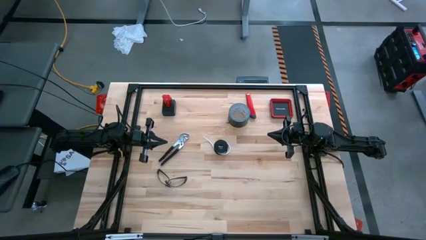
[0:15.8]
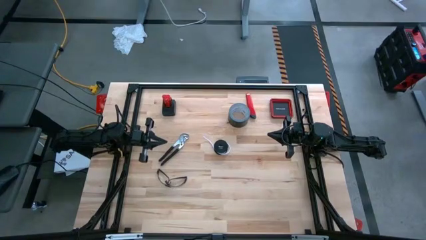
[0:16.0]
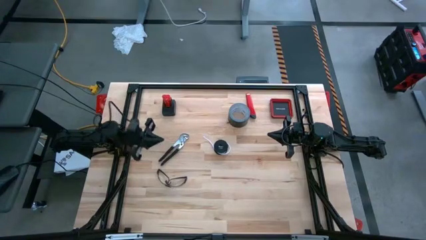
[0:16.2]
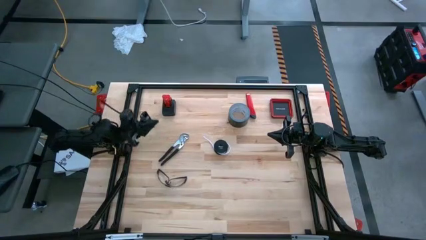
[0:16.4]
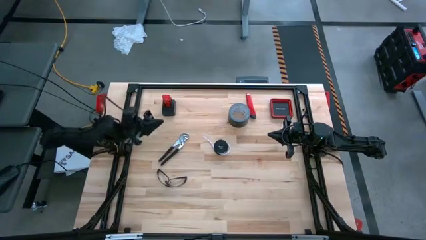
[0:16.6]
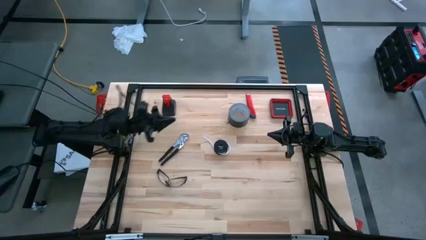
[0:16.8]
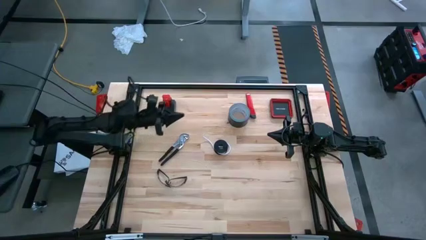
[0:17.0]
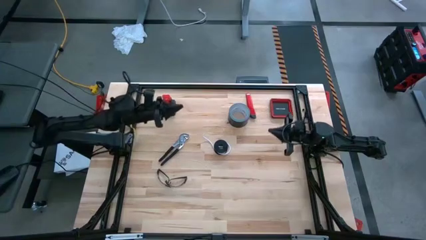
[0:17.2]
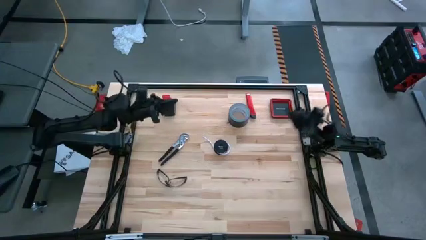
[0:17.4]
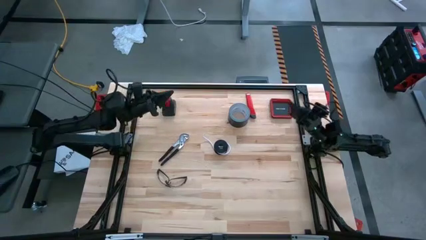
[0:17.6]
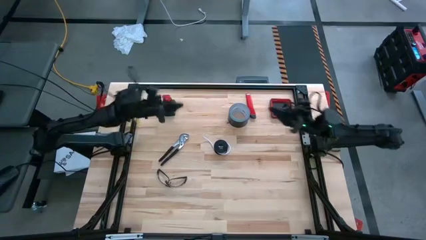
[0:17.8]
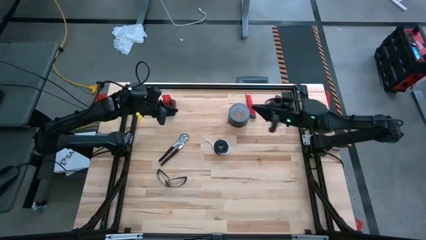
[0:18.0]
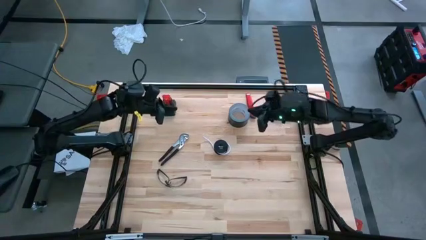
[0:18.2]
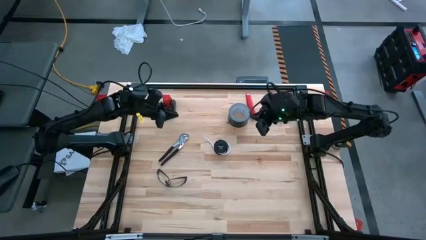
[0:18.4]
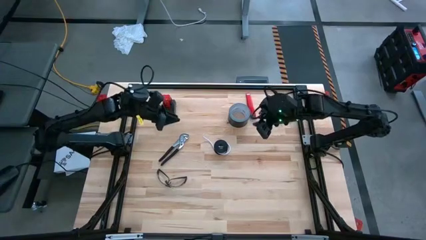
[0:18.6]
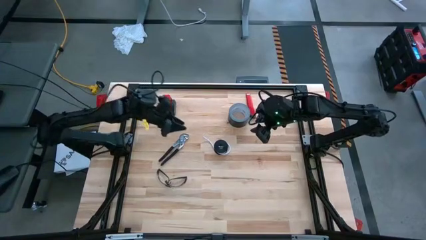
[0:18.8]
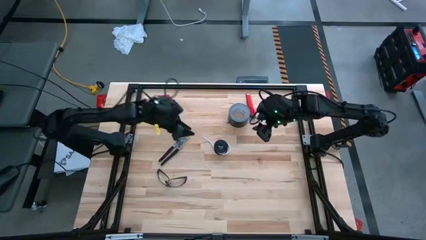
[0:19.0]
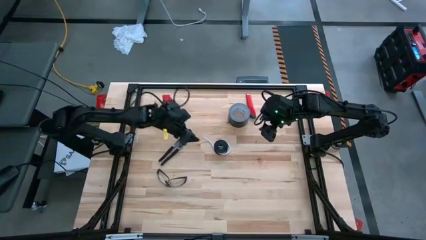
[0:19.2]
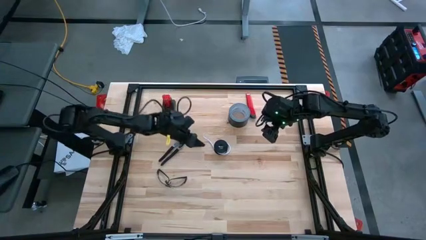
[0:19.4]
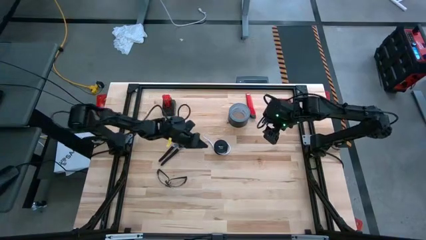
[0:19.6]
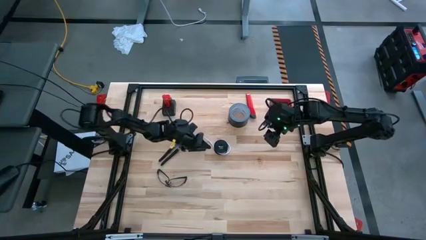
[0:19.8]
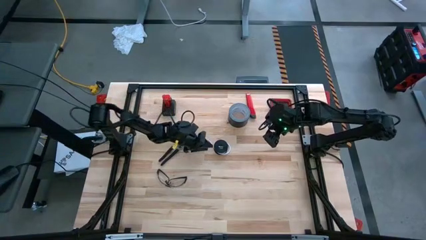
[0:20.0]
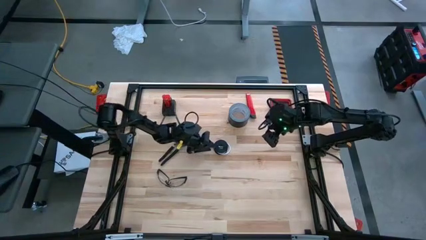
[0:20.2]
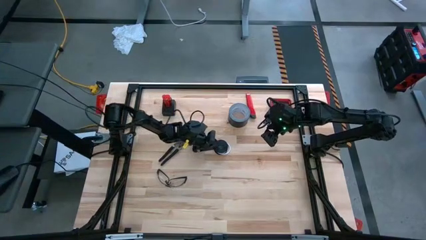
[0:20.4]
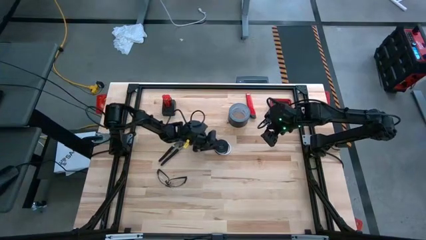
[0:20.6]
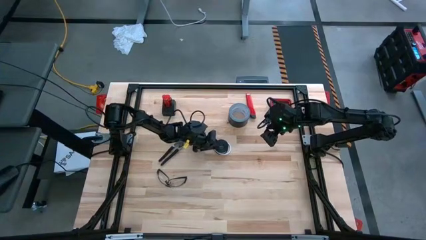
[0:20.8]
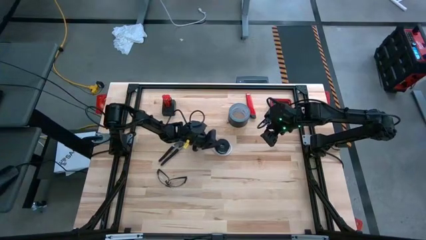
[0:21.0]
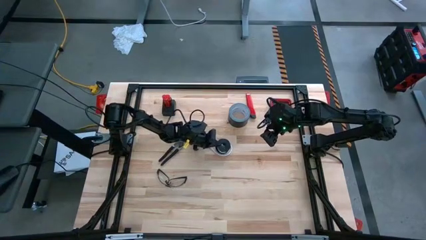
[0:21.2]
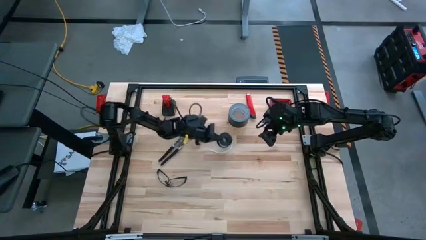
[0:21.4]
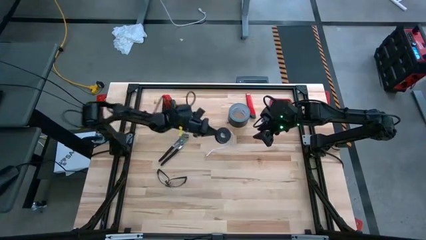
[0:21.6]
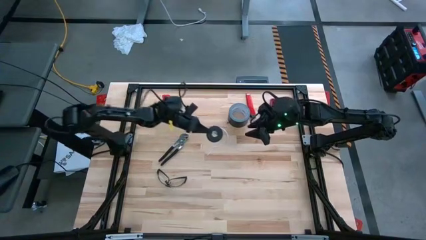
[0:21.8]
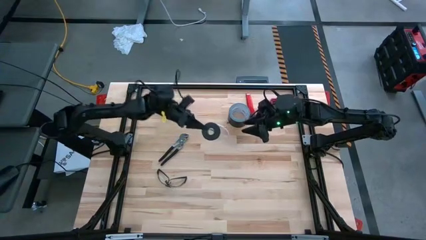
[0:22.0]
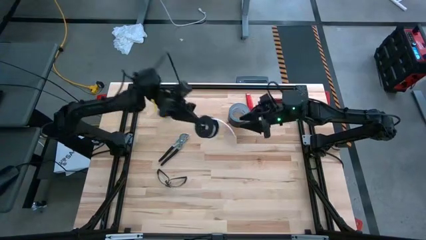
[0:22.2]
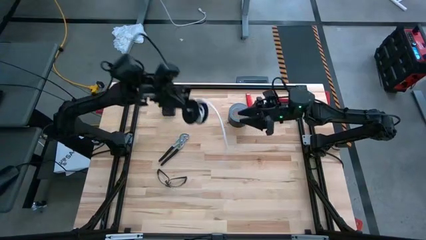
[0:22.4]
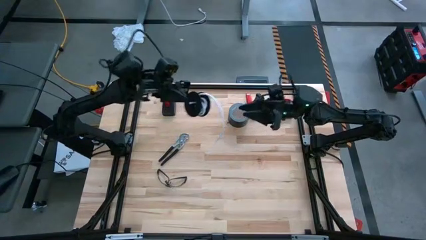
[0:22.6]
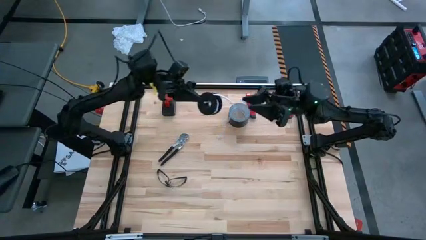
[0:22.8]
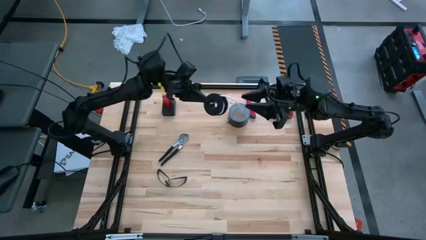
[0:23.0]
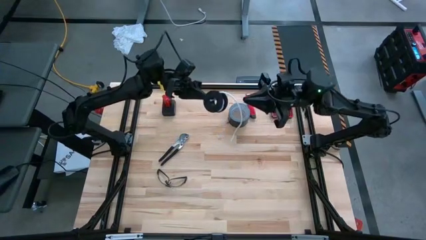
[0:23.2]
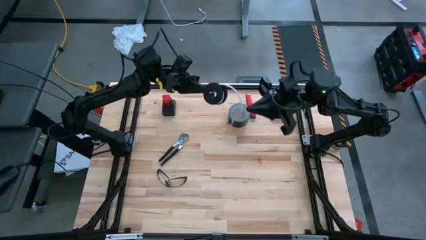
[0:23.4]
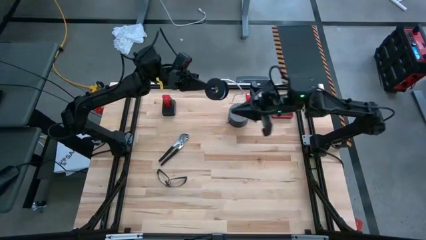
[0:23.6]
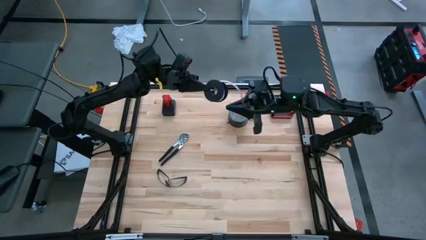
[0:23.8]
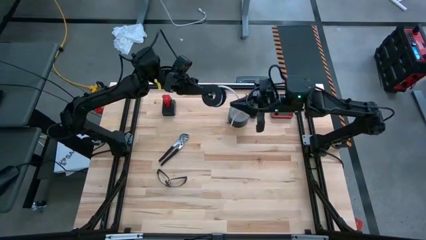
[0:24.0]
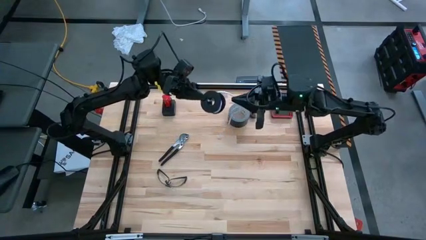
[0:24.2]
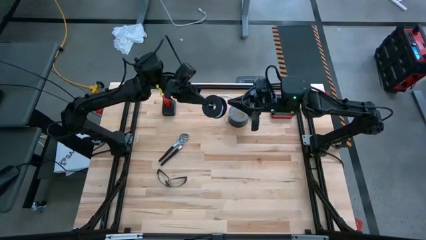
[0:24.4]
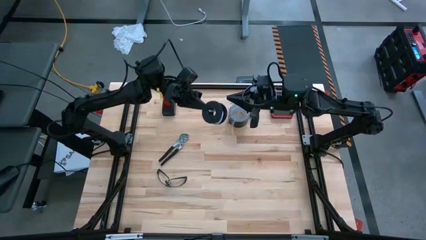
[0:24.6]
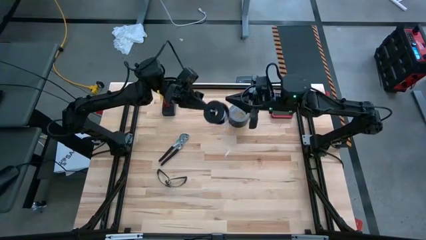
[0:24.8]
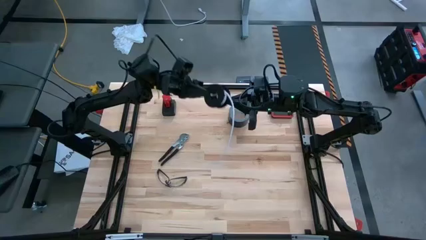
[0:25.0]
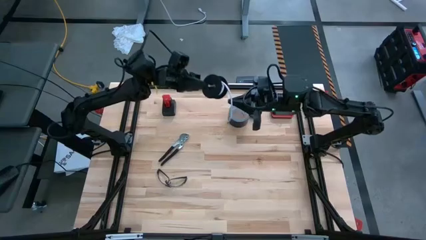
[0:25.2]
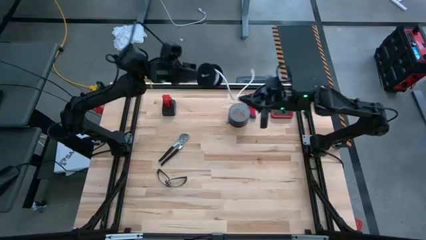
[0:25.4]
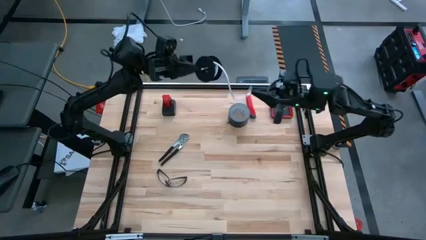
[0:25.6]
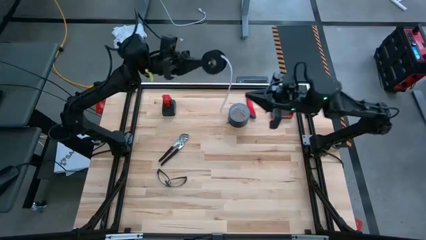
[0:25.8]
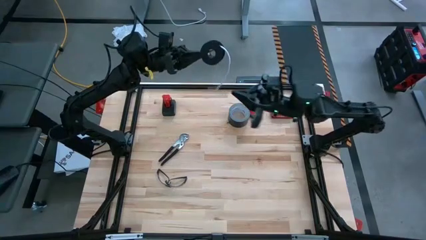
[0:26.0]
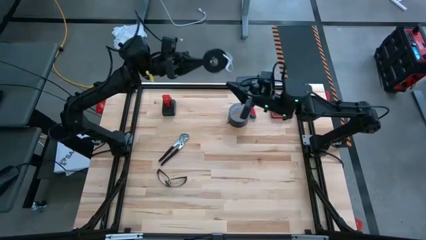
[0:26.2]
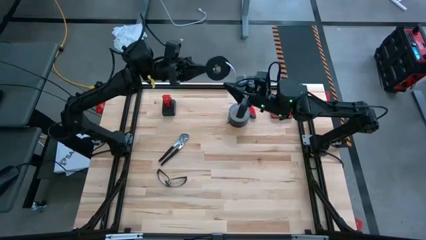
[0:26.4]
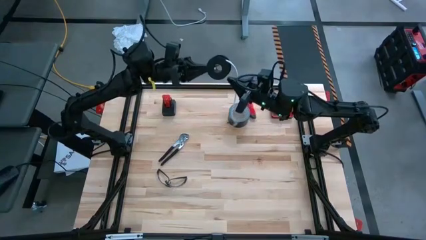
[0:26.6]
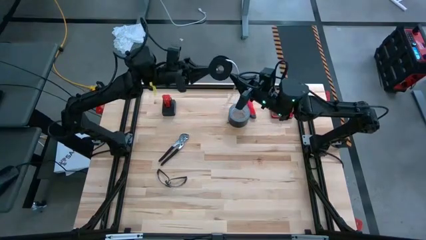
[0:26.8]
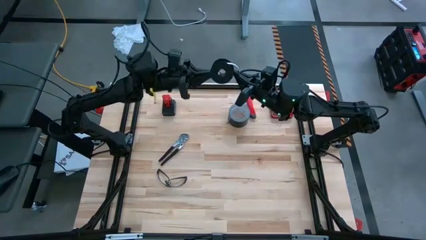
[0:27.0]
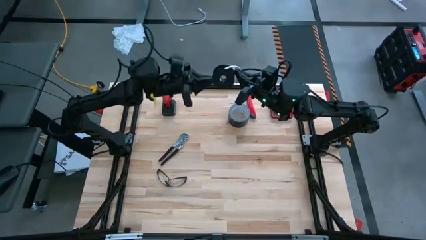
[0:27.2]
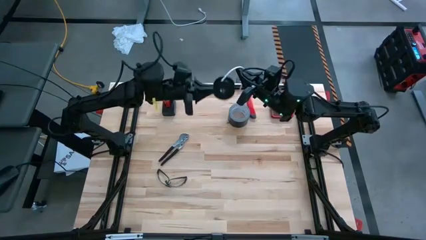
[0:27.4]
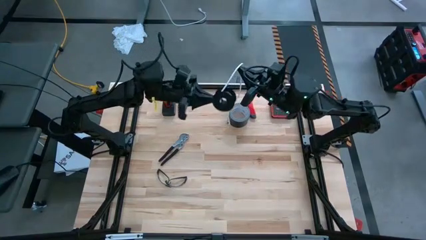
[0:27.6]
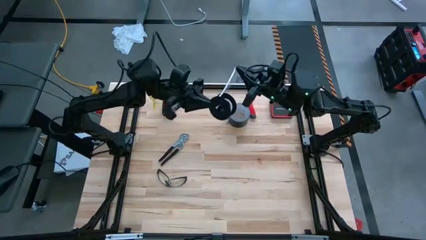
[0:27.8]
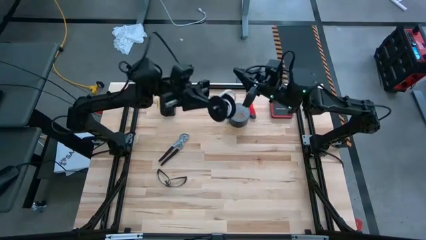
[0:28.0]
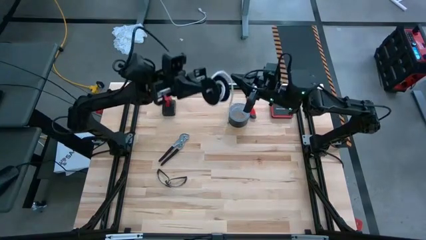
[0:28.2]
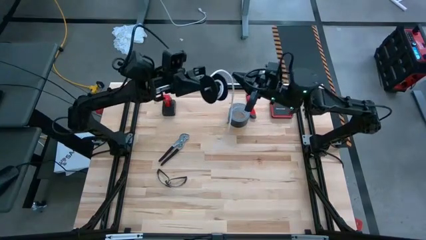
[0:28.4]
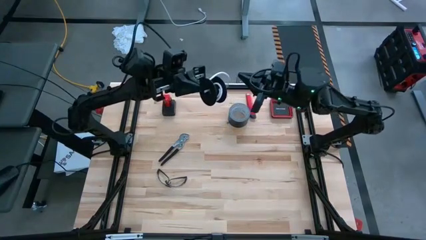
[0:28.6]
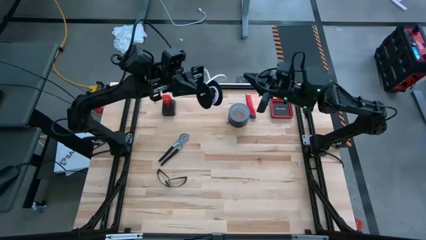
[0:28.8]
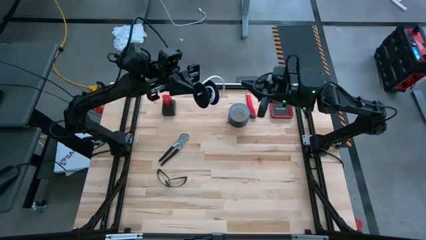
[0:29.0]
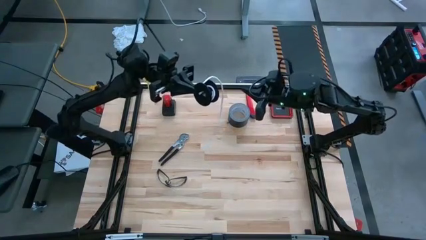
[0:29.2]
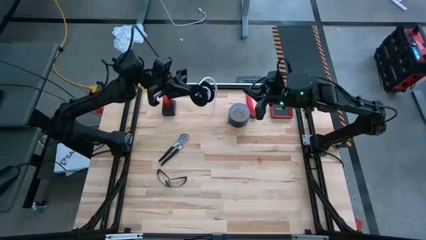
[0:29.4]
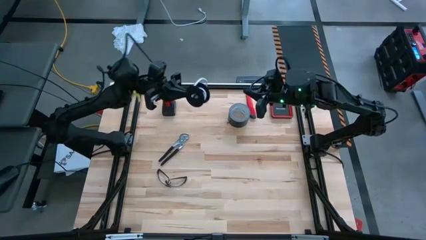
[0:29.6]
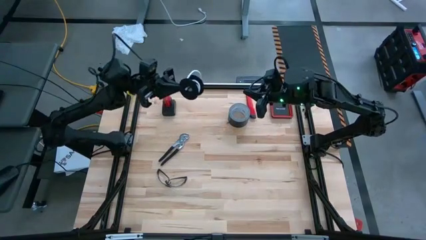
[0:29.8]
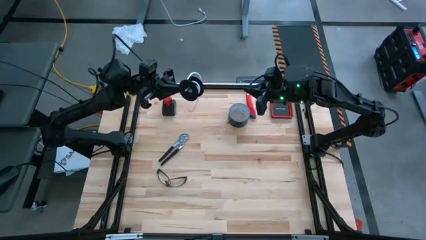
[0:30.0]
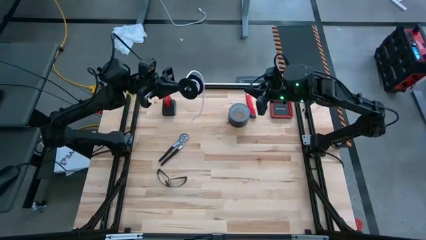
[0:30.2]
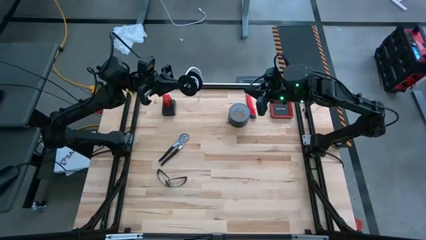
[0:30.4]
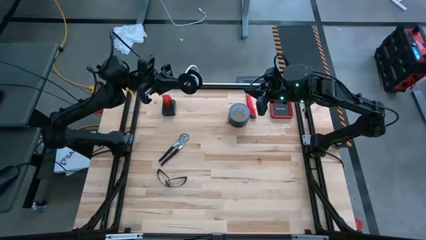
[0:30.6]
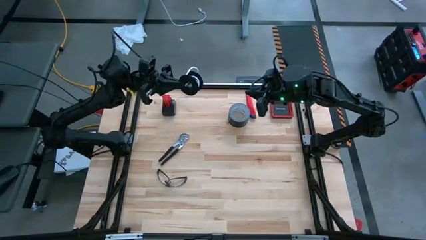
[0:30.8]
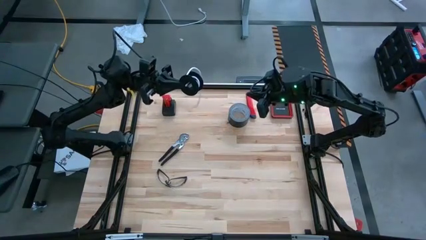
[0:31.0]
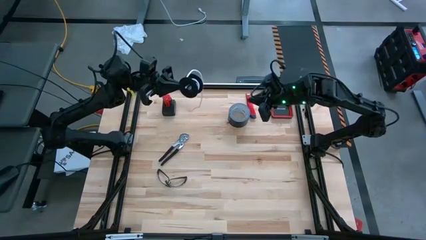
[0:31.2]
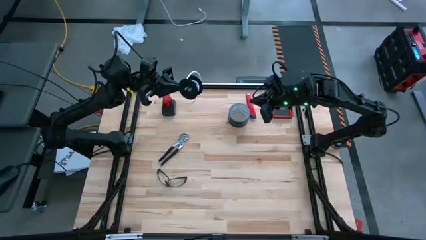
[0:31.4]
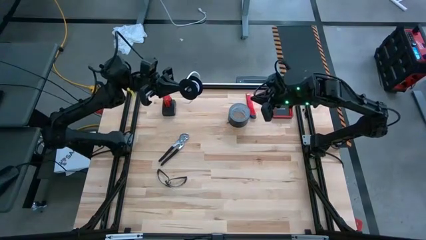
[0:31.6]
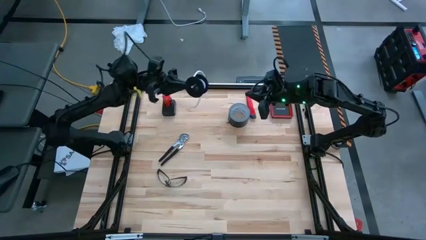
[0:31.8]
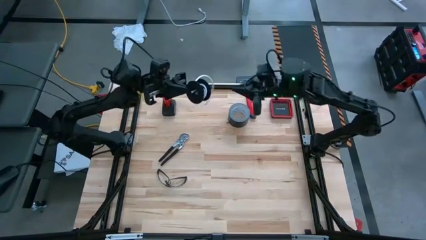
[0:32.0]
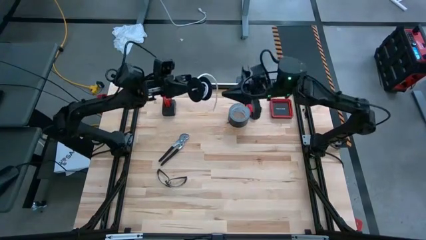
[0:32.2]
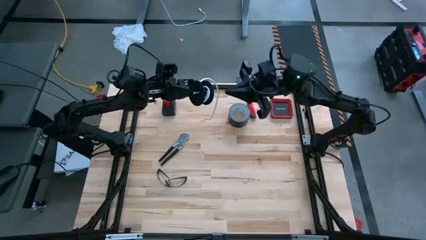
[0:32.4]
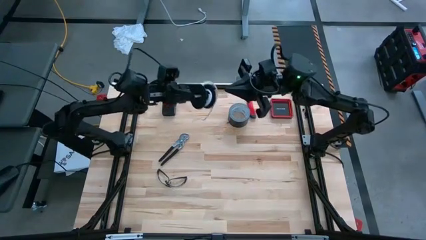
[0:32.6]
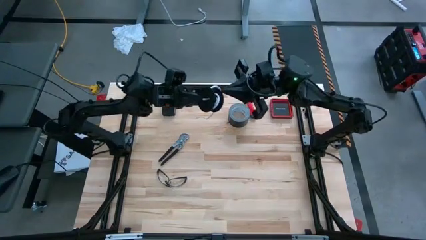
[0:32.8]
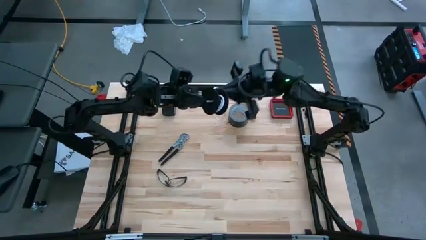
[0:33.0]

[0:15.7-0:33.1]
Task: Coil cords
Uncoil the white wire from the black spool
